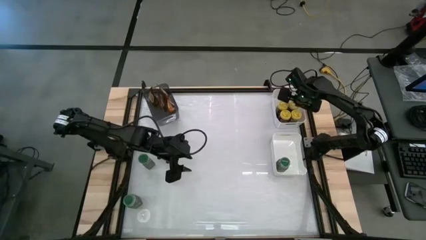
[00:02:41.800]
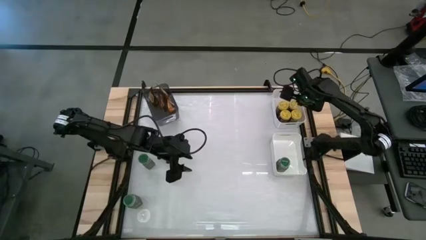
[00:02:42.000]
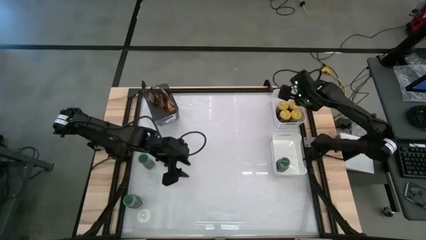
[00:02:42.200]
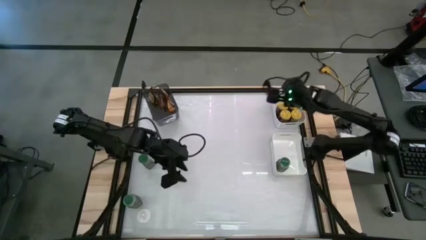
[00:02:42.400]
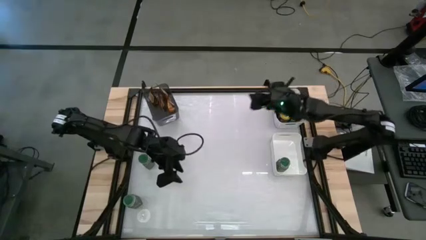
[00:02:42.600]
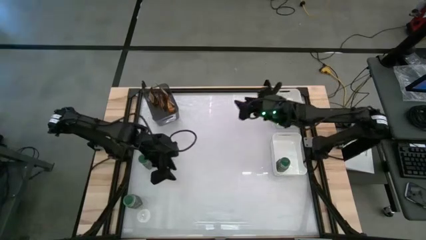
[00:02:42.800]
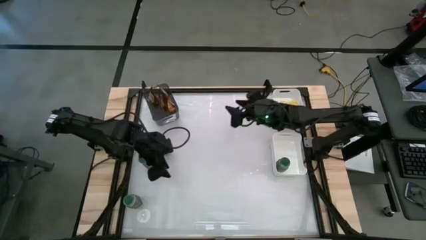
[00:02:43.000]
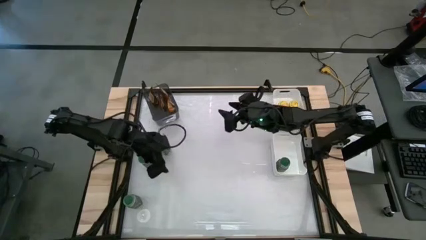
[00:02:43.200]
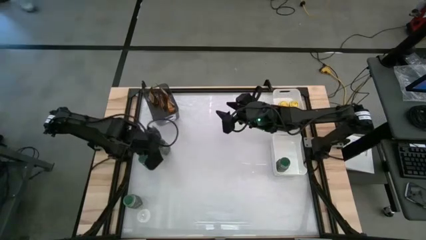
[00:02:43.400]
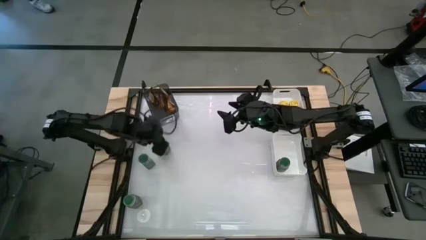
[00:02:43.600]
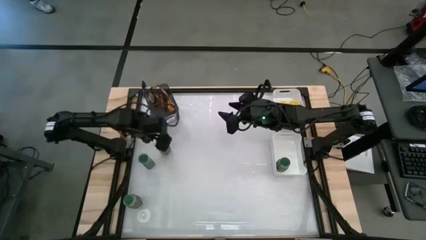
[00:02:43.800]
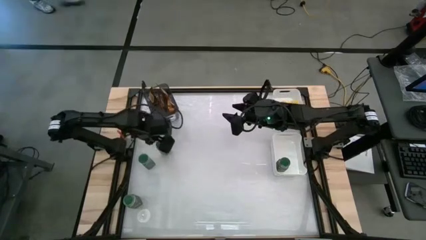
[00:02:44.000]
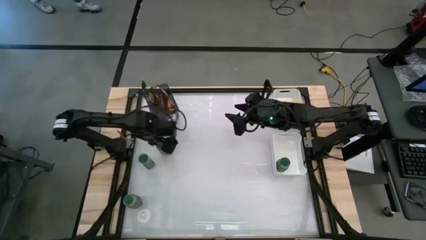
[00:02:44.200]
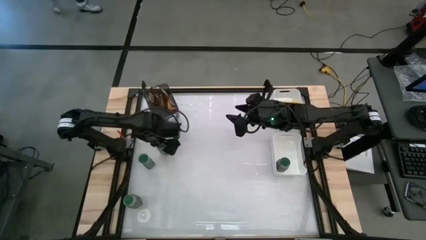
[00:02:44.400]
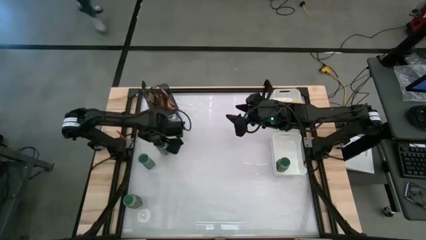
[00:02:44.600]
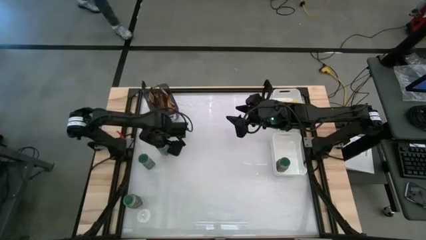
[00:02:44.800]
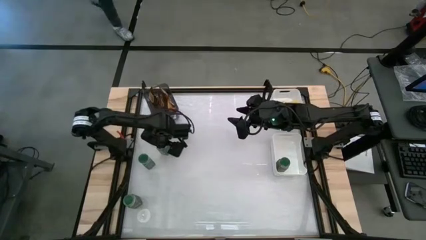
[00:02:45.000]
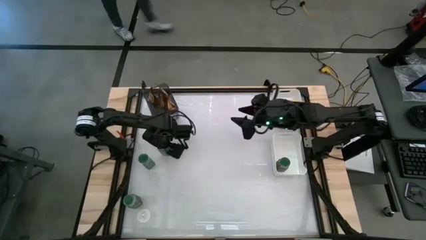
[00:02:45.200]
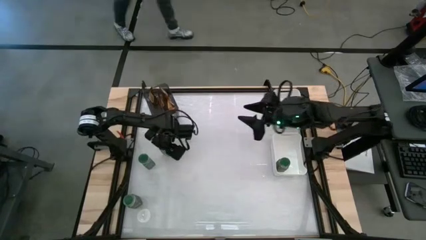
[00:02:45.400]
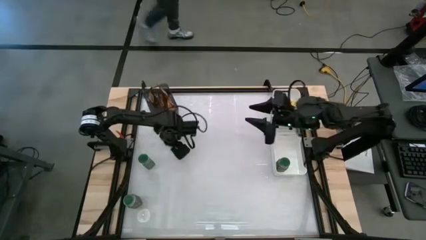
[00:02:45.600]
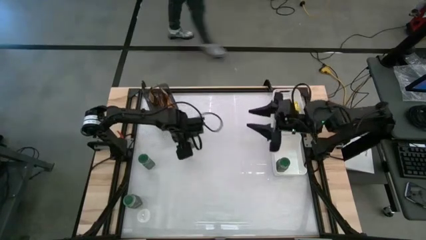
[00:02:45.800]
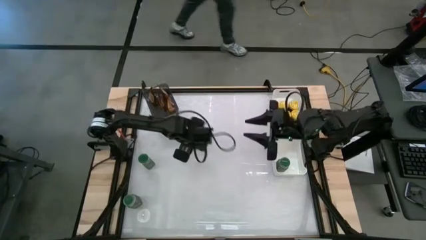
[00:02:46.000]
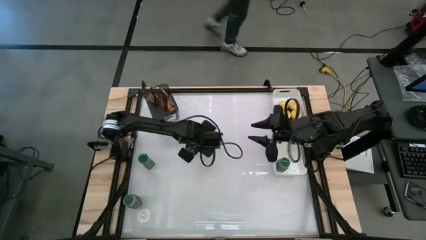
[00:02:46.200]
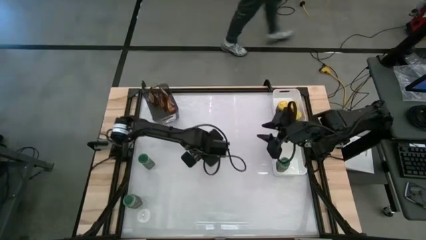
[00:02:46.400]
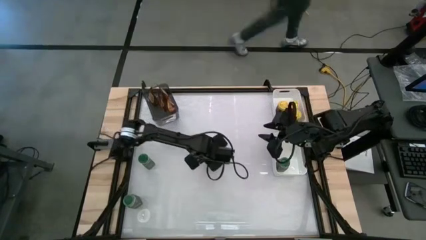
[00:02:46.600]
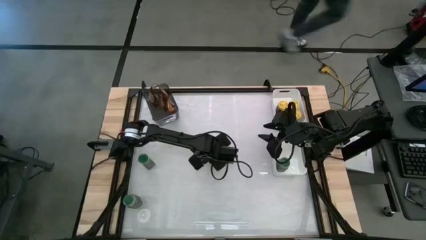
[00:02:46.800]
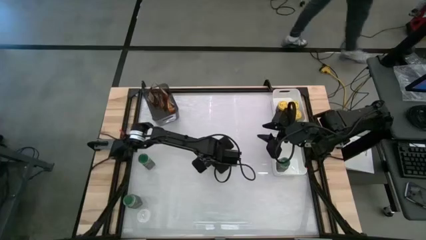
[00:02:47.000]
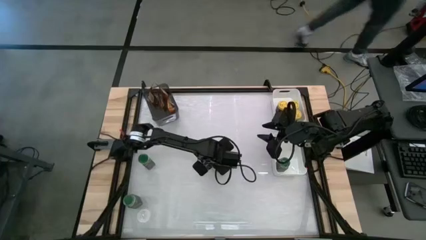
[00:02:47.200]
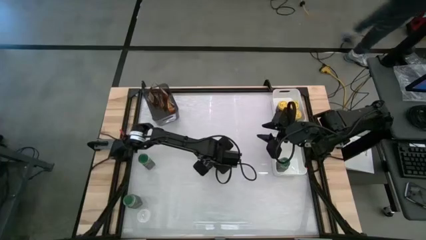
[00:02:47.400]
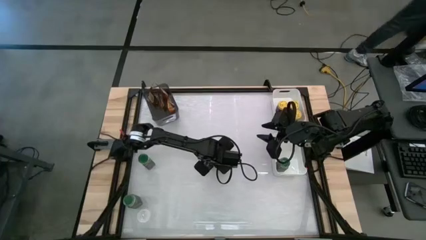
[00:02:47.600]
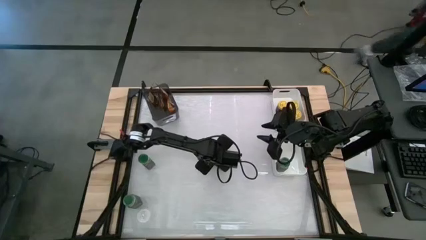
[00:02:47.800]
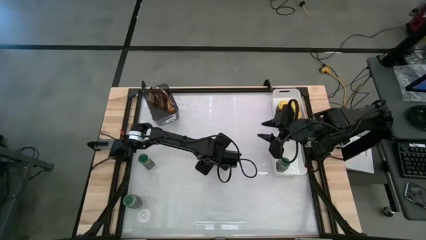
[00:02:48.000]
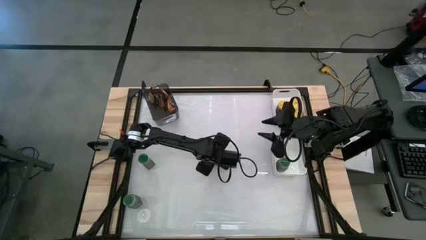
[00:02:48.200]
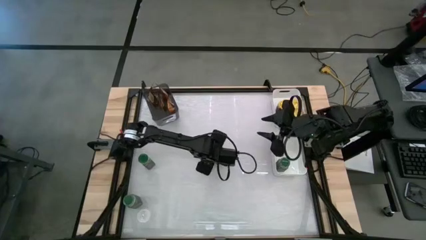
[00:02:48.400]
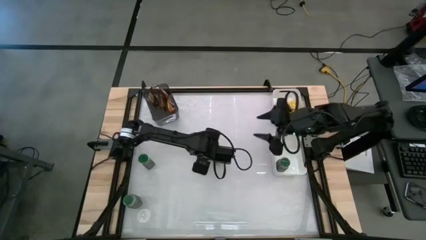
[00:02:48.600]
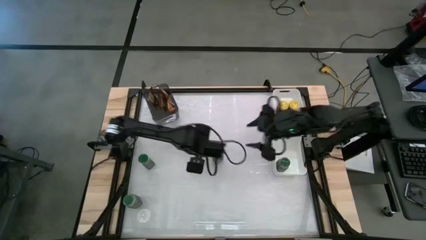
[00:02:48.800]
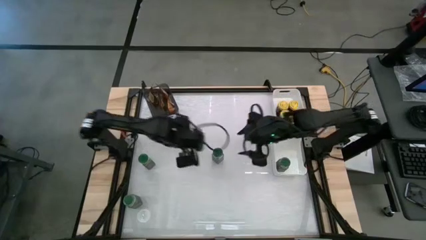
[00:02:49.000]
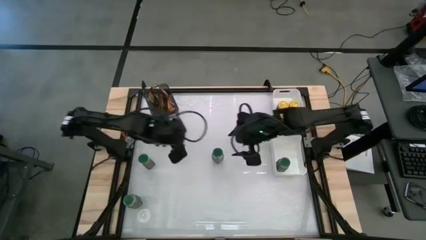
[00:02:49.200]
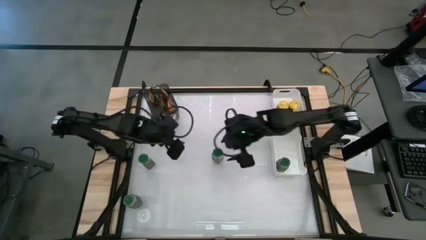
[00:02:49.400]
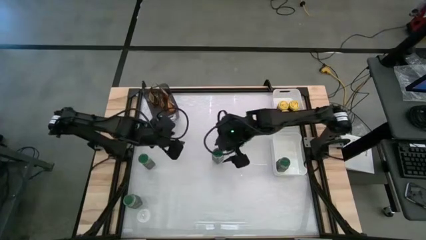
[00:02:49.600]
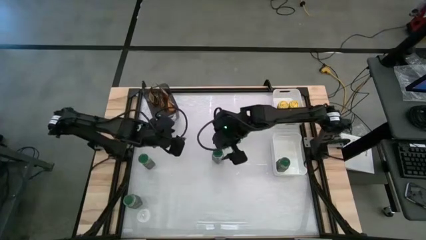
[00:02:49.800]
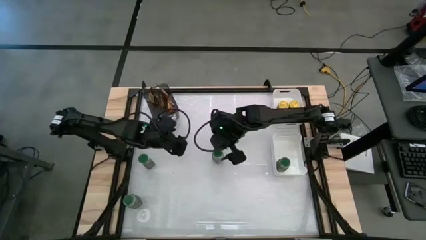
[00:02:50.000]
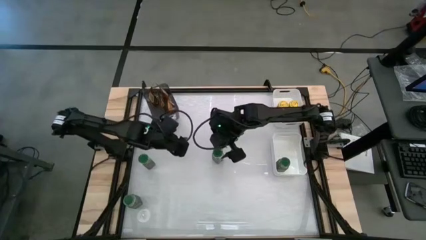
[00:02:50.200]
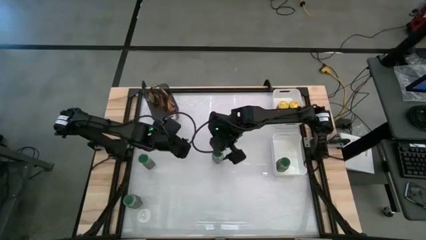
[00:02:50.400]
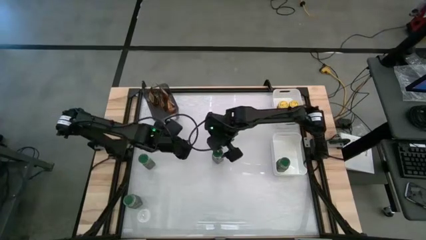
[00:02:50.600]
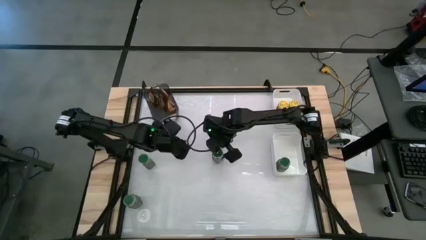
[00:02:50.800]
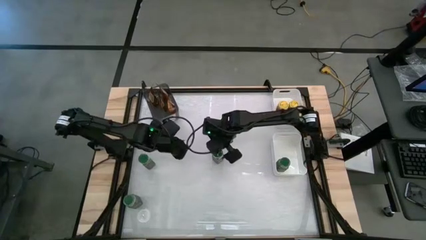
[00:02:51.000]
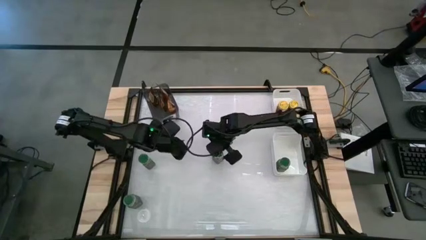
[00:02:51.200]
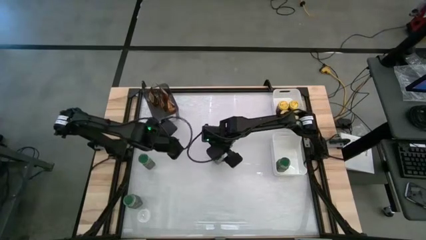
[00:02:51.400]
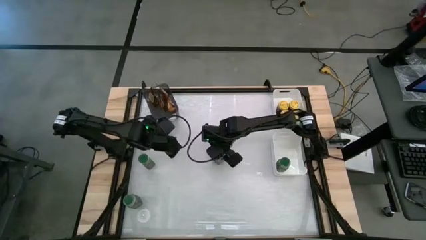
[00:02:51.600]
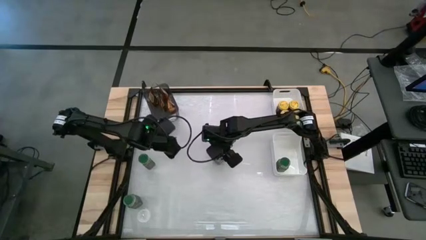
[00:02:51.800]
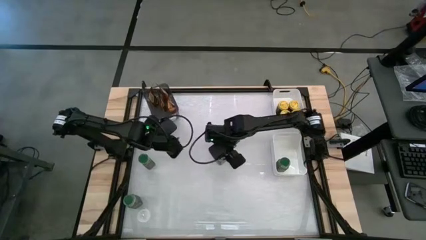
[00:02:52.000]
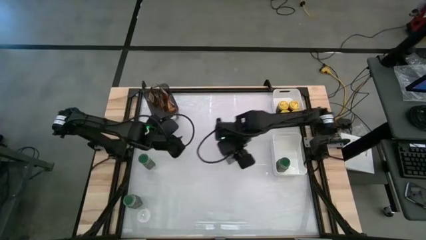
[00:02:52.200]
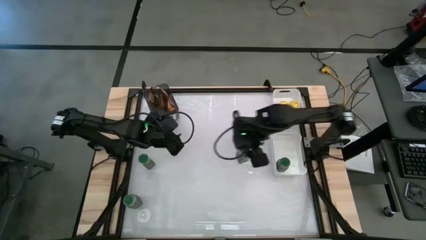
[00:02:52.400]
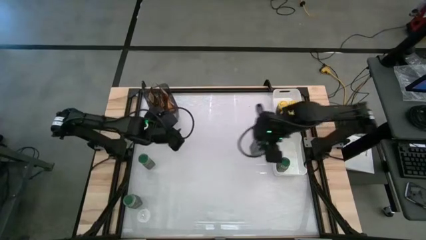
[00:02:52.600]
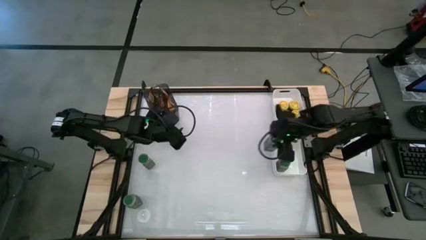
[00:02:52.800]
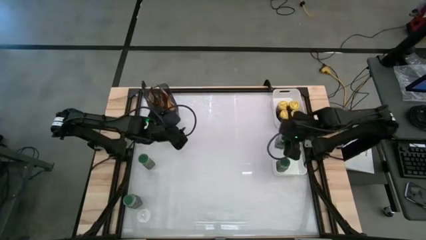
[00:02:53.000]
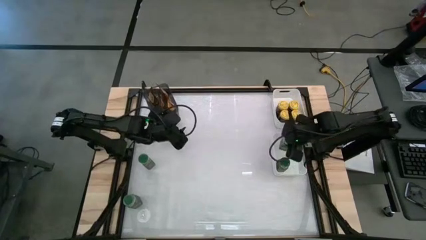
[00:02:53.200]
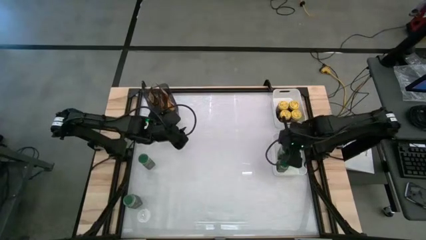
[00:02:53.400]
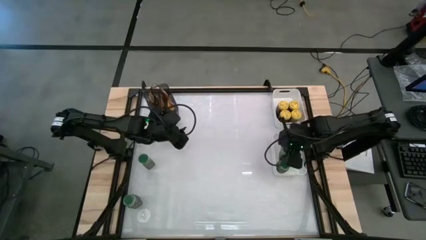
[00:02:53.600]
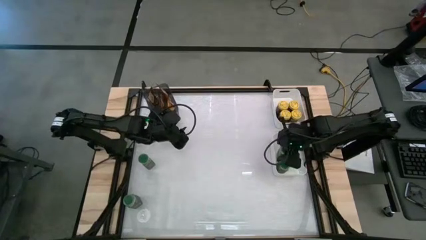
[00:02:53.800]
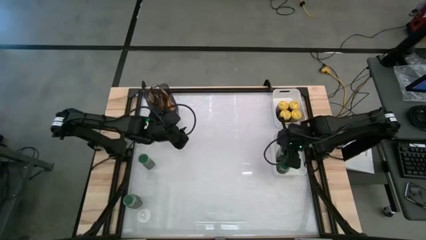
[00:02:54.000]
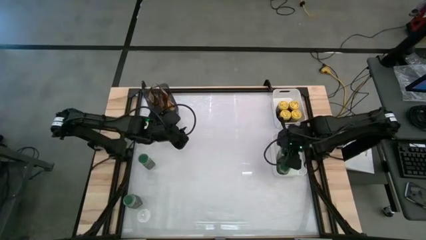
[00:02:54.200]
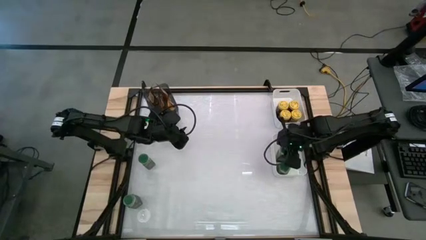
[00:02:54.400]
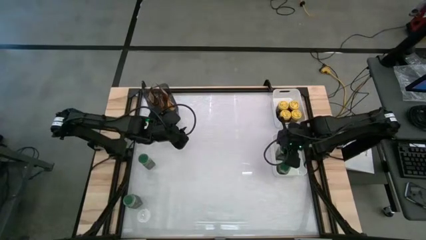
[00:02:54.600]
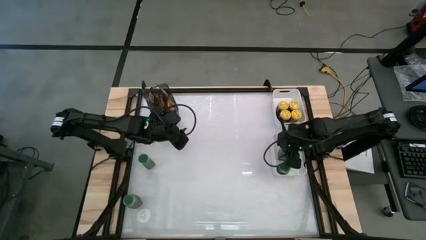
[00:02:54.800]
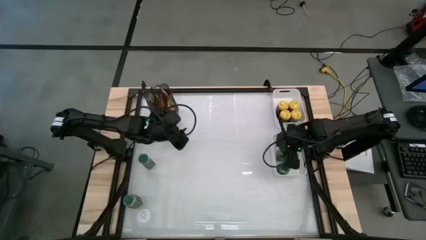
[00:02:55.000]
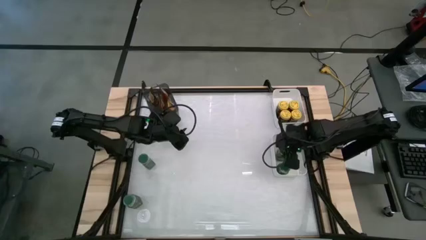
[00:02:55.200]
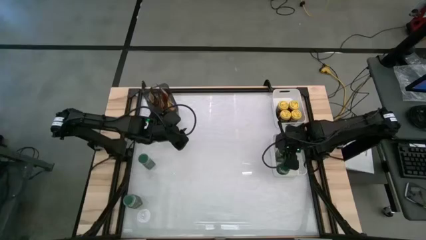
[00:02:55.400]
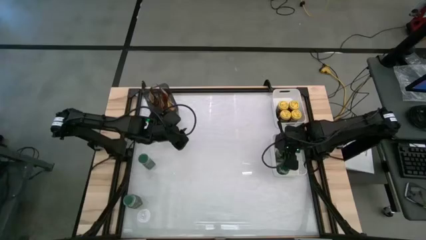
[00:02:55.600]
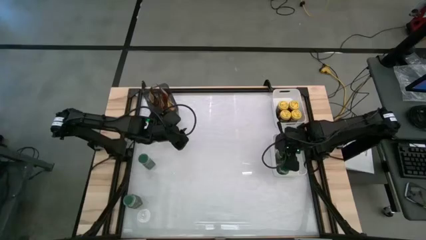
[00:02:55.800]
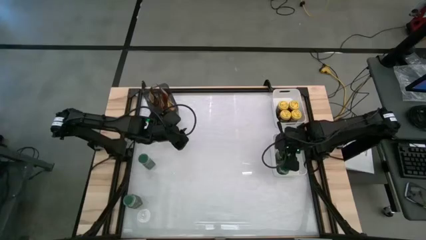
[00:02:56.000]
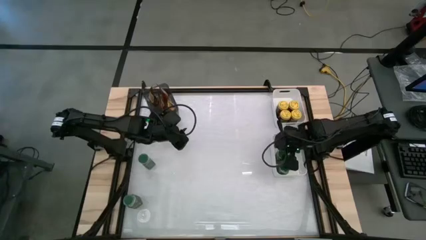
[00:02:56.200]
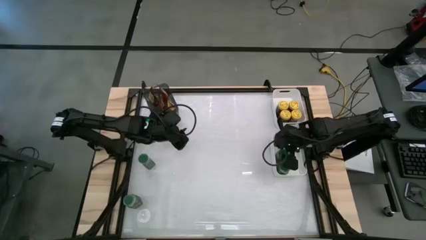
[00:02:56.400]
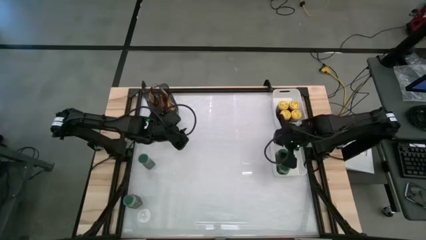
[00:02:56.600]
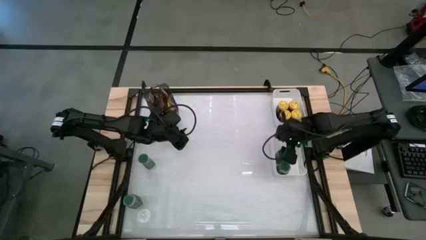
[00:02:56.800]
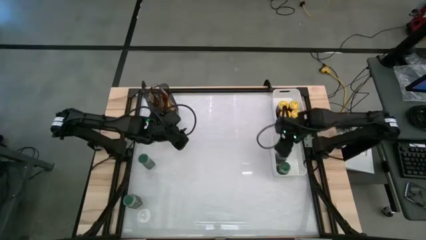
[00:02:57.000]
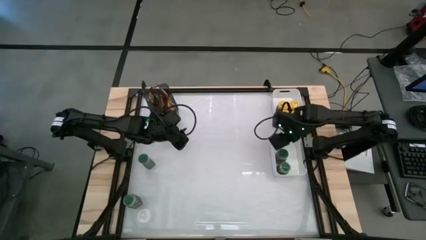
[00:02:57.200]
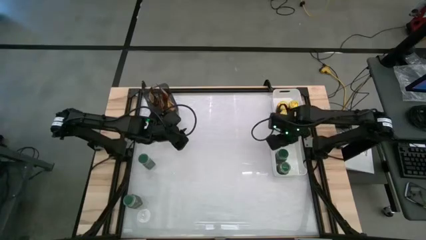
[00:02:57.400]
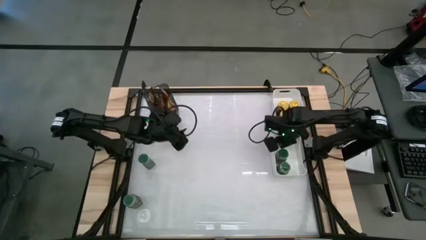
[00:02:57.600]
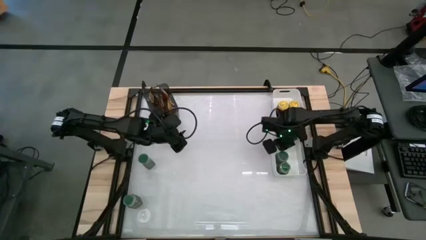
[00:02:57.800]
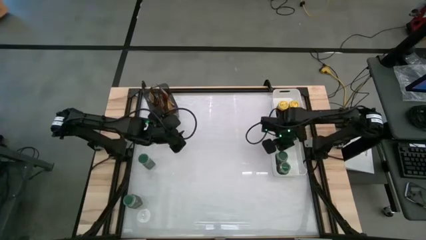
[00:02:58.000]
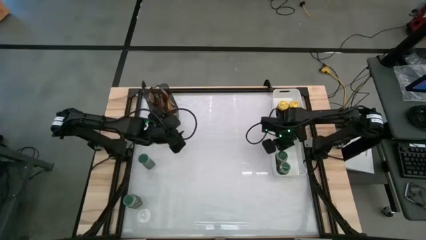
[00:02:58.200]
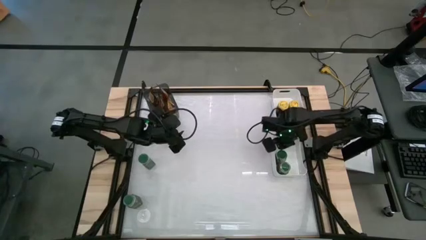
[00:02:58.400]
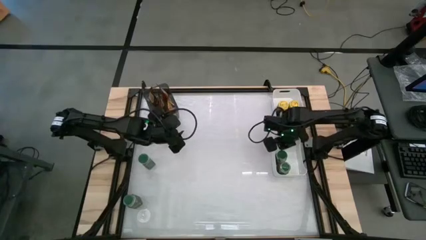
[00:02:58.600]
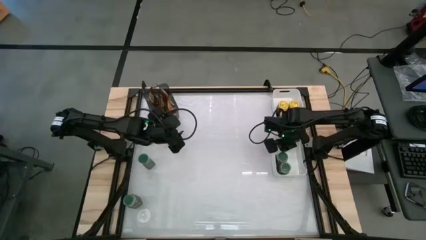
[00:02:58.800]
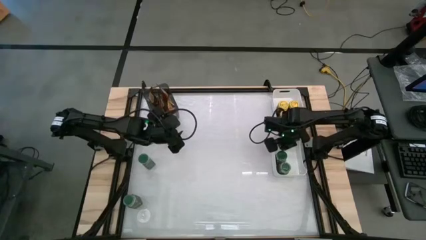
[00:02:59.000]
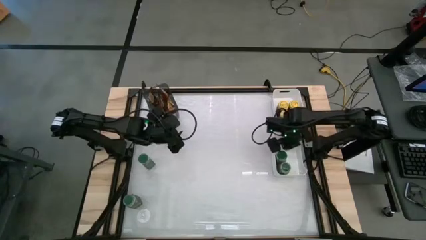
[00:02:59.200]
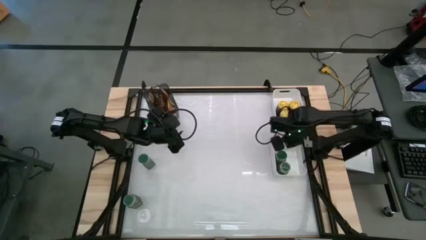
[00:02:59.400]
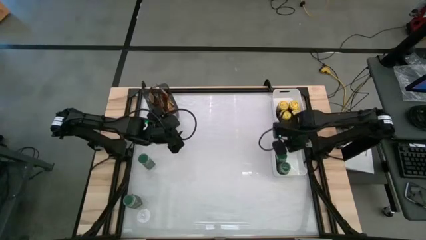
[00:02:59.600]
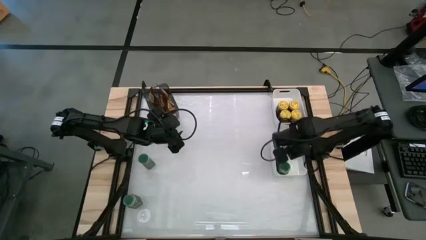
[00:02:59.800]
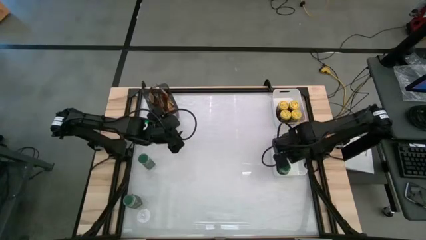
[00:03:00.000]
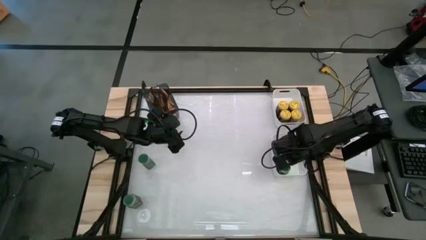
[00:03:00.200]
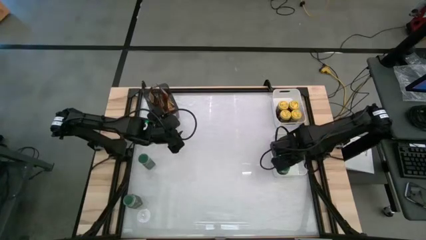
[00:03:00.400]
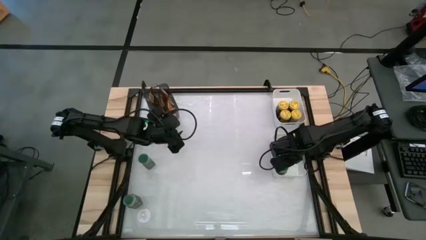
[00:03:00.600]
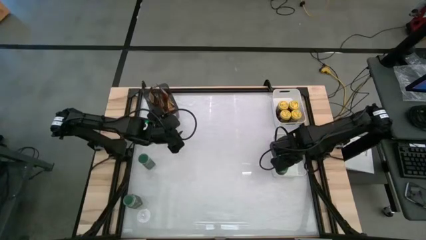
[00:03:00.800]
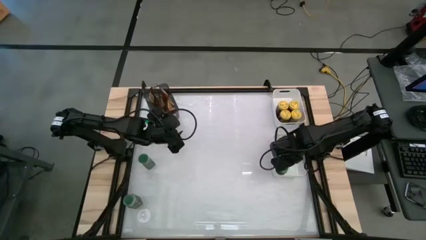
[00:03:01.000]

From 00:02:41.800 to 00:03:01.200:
Task: Sort spices by type
Put the green seasoning bottle into the bottom white bin
